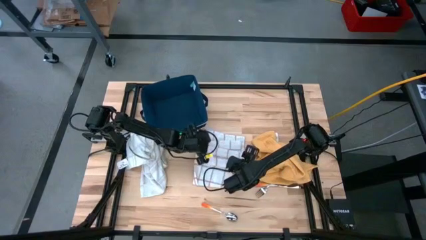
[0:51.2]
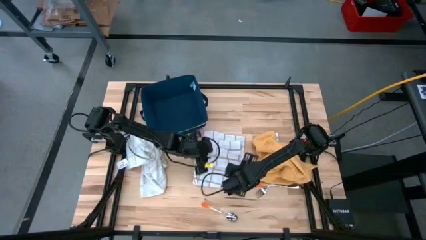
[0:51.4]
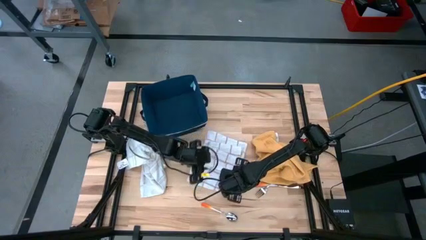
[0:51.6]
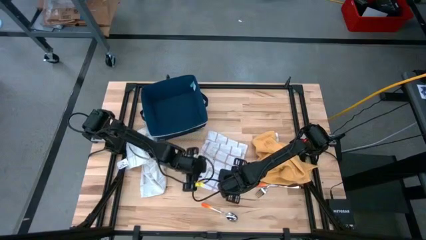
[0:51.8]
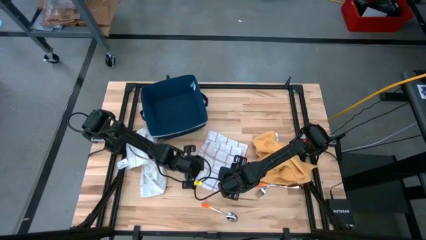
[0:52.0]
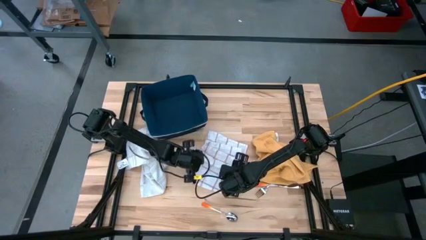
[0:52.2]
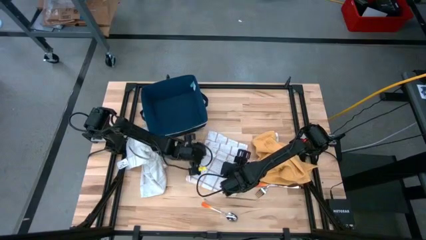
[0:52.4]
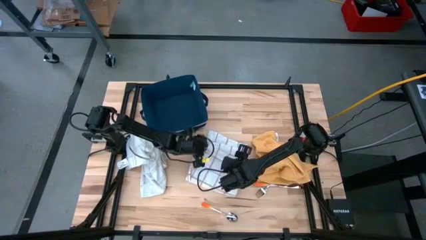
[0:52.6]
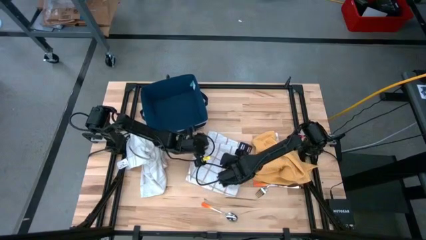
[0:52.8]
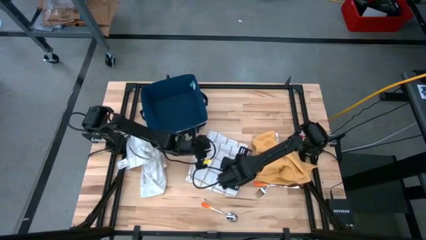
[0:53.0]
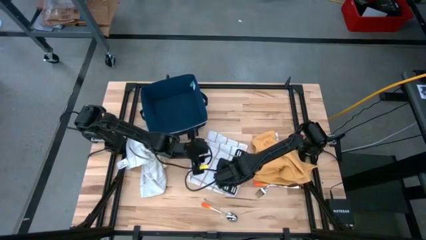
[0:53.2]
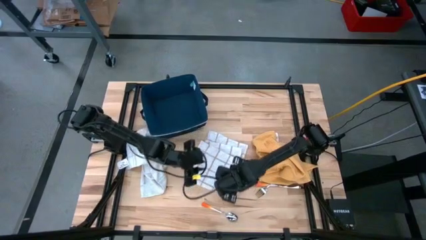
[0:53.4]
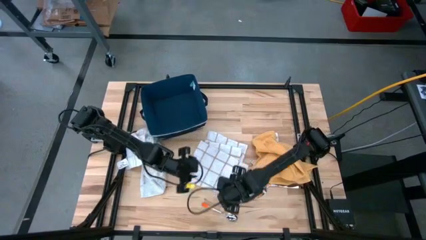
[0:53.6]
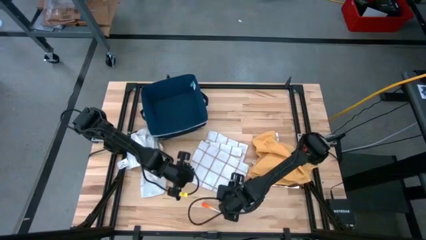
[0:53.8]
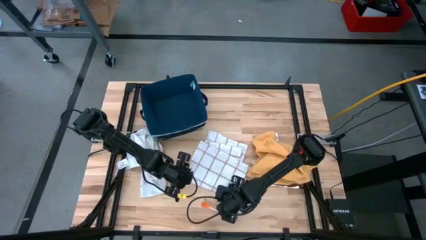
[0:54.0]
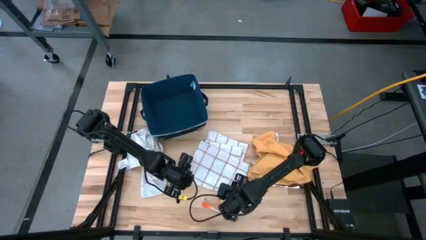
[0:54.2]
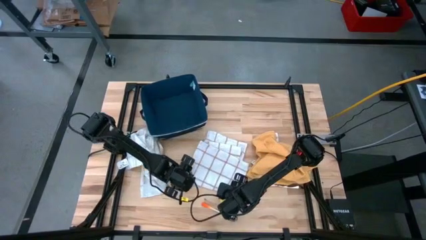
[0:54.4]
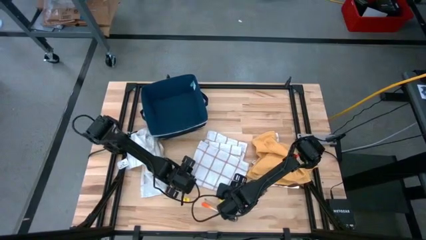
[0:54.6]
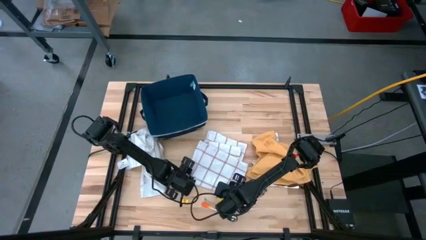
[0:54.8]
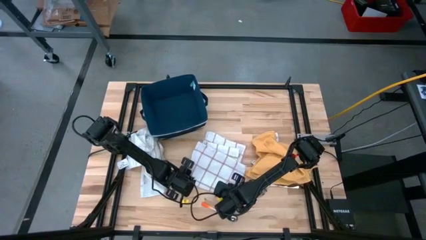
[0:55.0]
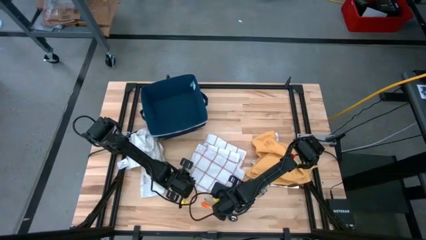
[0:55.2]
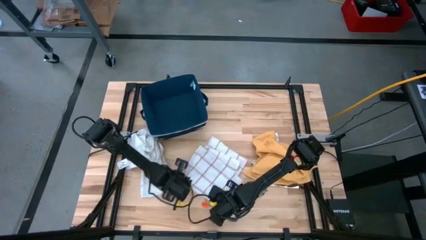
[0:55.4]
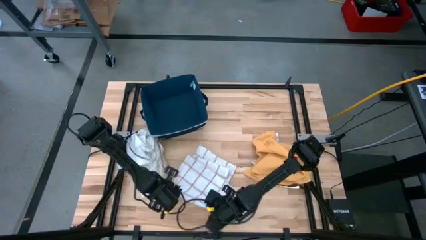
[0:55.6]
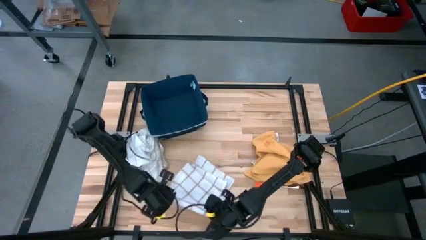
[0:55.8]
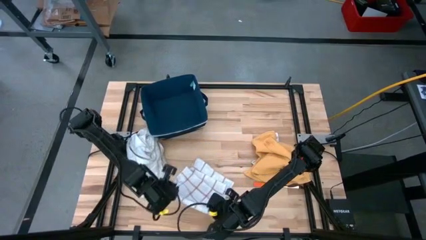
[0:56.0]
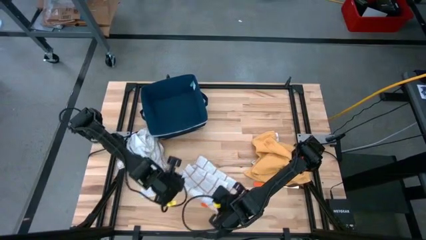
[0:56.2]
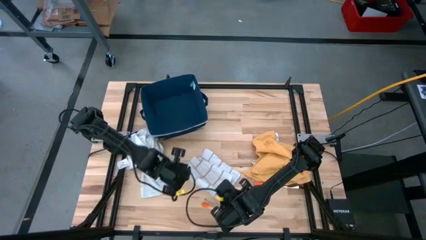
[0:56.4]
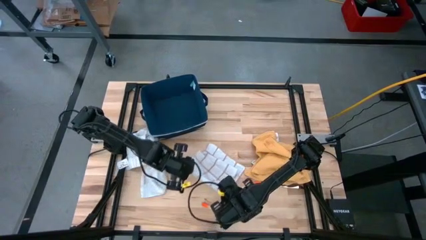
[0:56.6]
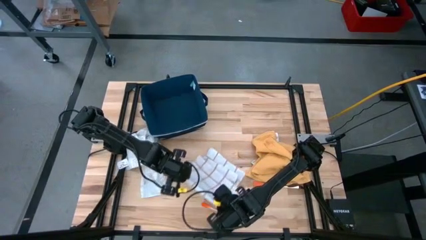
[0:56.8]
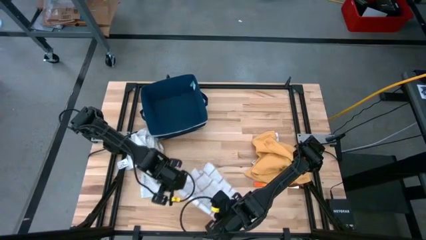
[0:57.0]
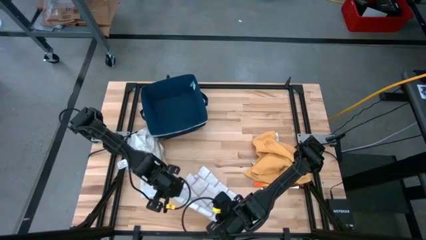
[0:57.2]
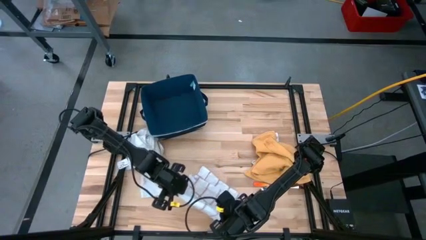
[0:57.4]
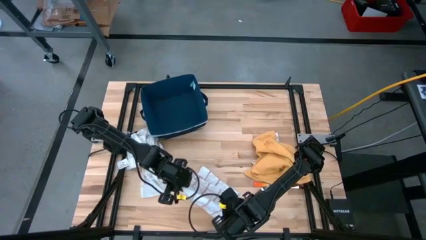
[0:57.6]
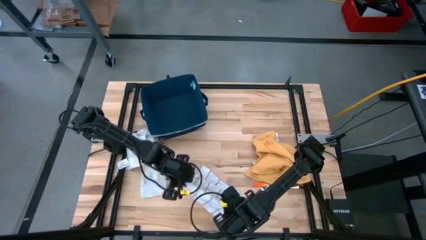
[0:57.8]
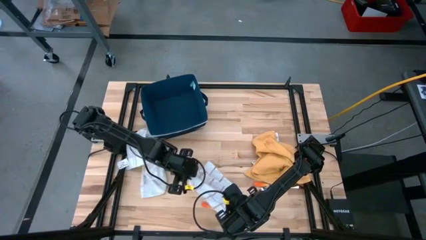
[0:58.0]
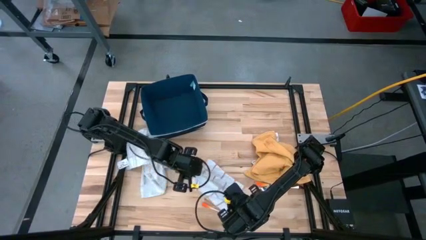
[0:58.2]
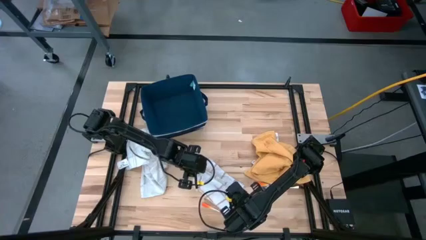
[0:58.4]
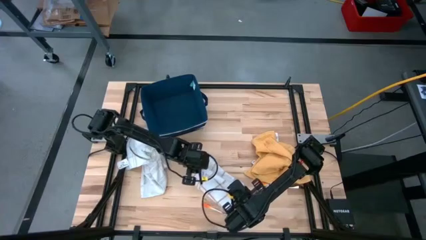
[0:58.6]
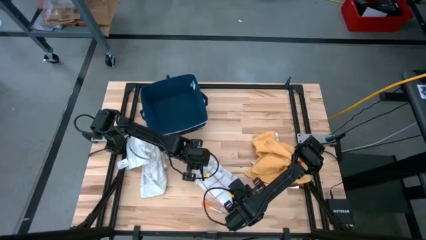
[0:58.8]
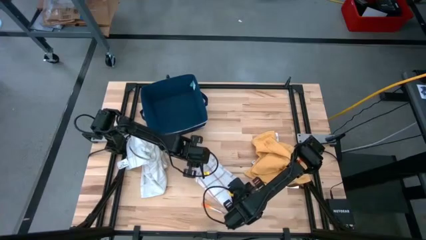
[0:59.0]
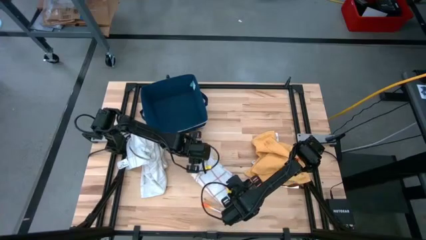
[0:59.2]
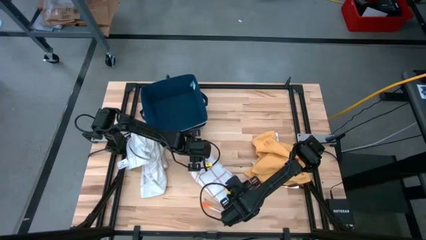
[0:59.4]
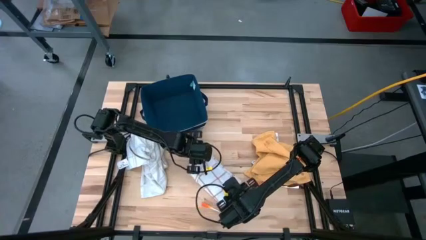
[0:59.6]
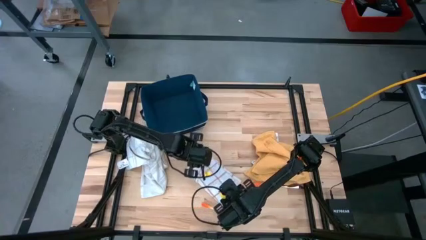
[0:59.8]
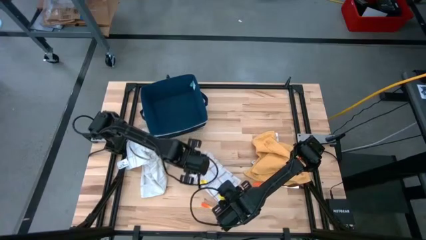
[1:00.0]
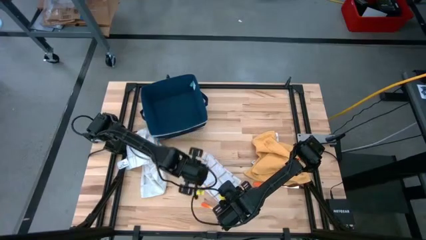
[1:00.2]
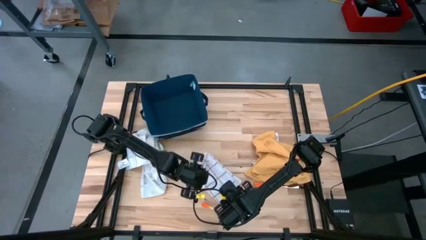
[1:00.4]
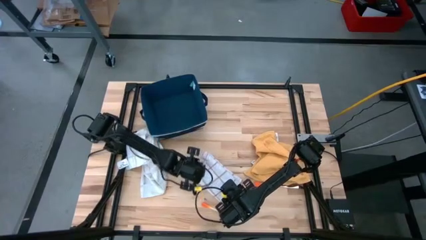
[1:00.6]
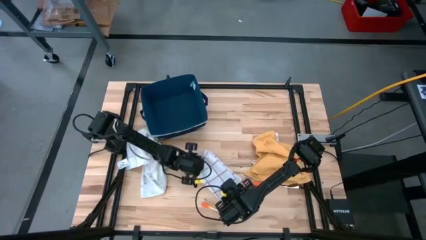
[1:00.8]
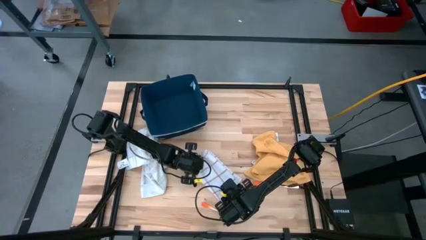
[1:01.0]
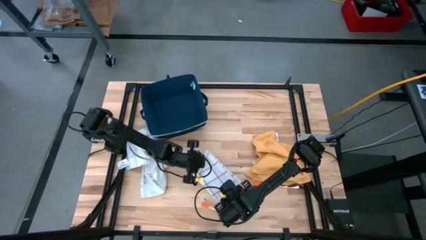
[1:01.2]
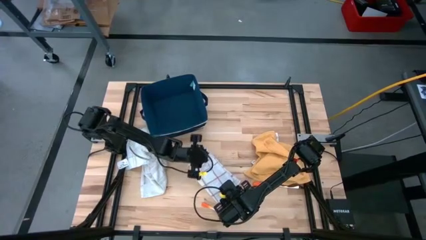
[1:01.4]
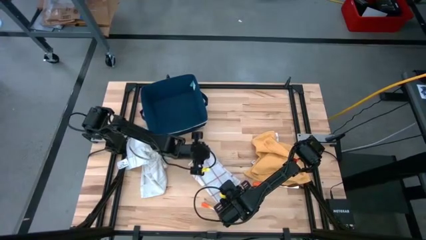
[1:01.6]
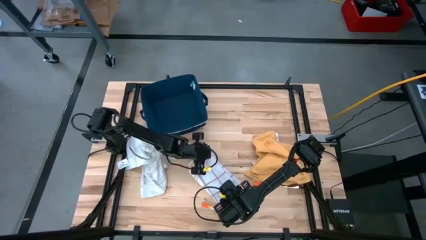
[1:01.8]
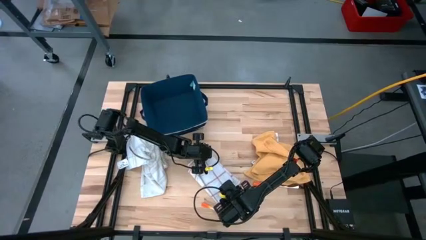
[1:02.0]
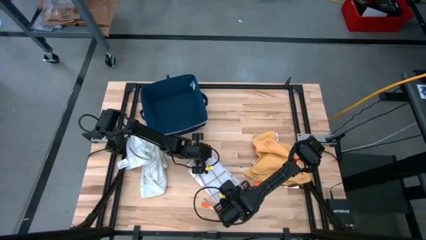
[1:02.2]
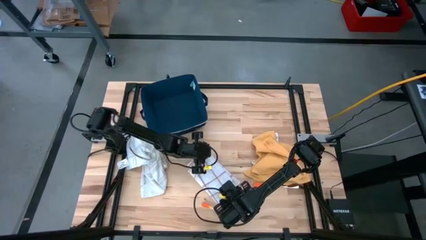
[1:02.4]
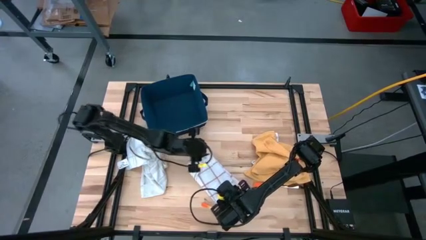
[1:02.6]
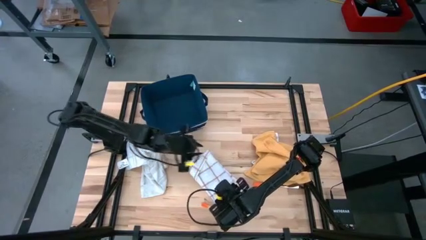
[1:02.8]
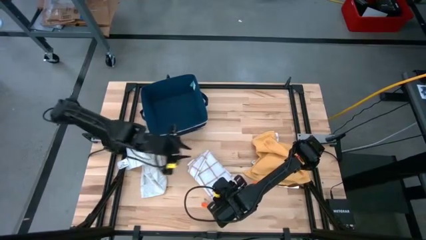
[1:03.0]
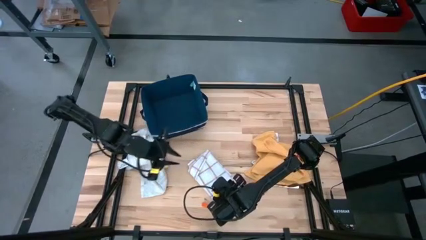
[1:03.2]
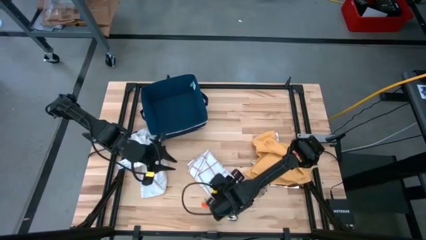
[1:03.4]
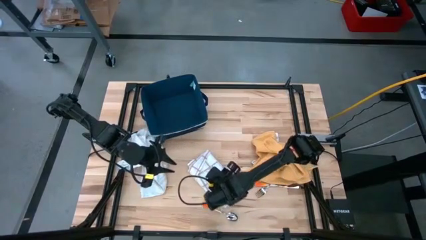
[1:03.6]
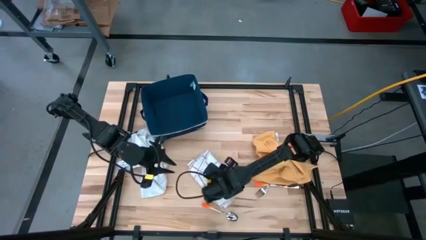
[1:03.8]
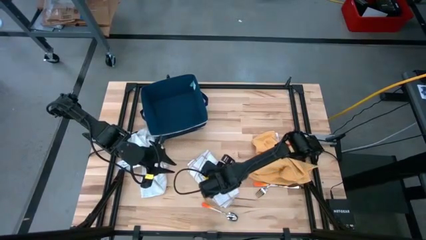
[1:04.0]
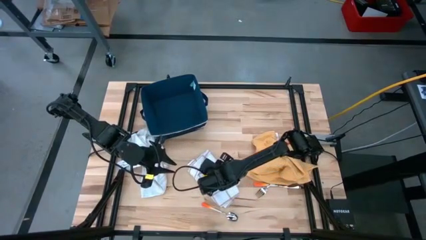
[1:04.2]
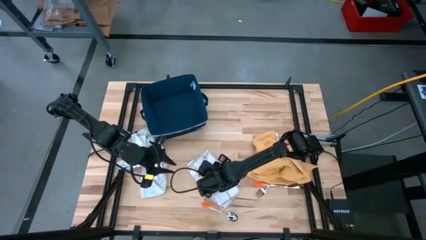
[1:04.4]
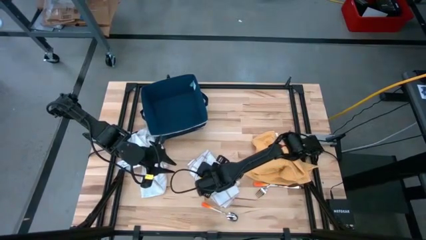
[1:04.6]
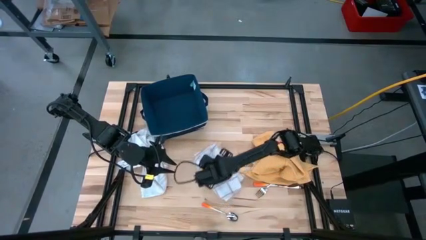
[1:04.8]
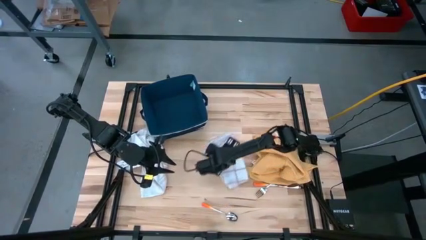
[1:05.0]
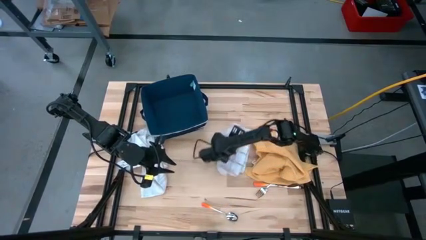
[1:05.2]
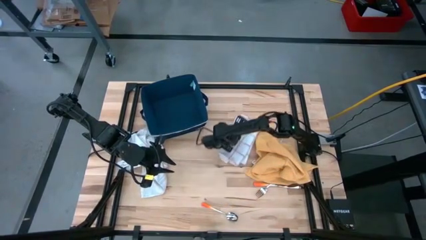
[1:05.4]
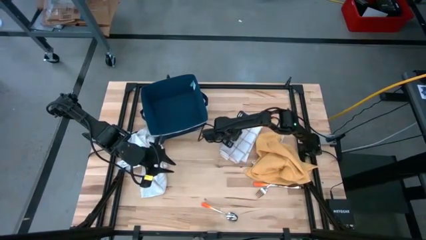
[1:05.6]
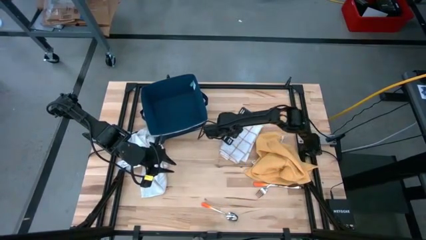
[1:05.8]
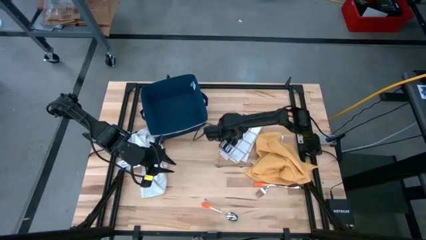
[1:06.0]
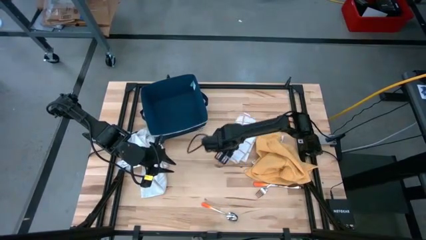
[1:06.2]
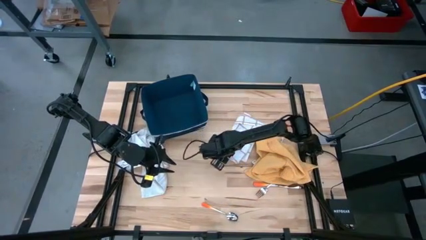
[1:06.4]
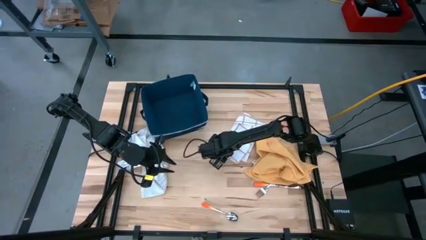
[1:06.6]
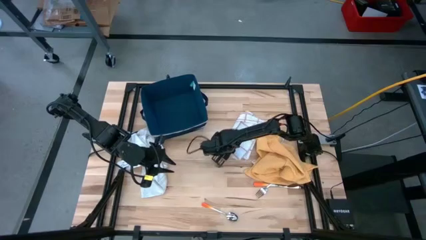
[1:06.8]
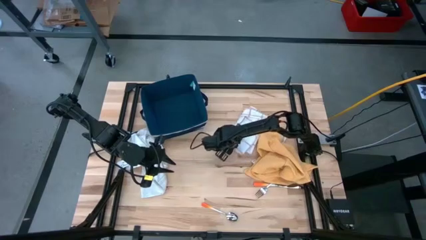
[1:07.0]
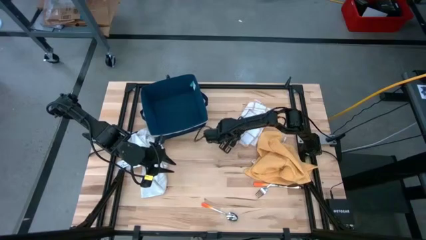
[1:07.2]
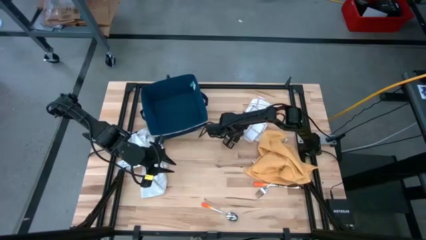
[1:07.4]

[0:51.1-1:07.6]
Task: Fold towel
Fold the right white patterned towel
